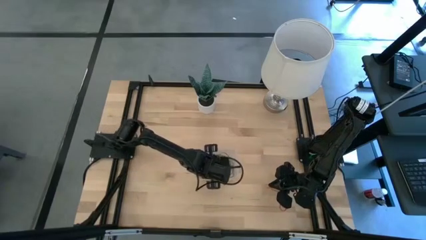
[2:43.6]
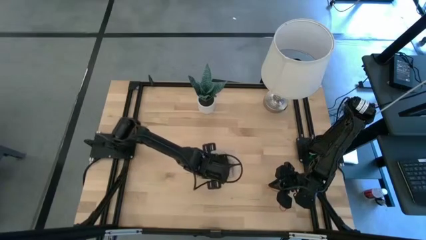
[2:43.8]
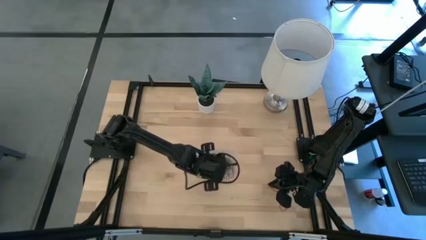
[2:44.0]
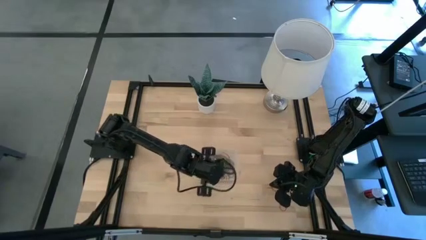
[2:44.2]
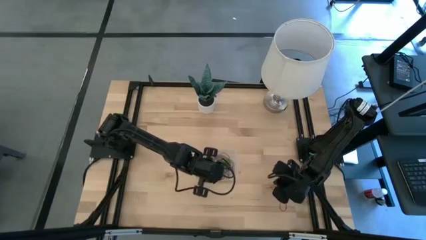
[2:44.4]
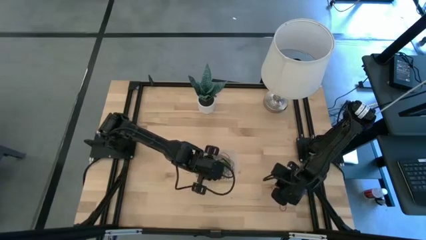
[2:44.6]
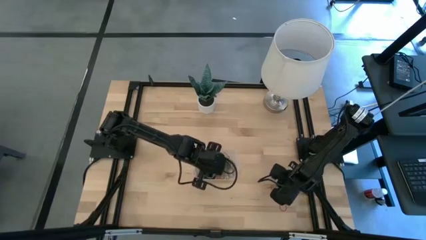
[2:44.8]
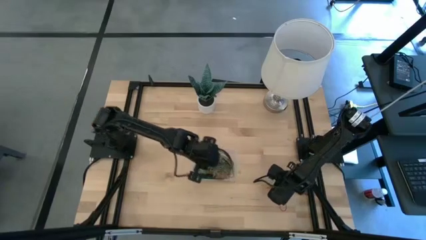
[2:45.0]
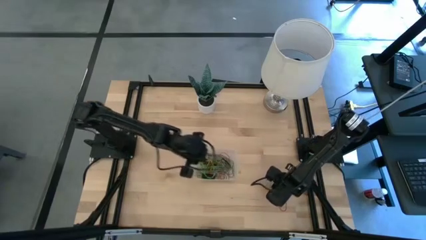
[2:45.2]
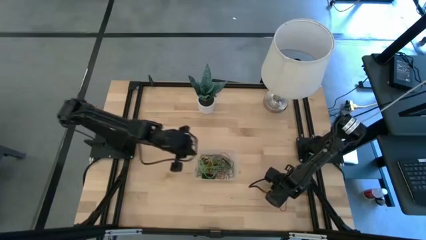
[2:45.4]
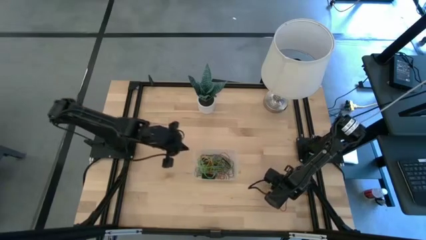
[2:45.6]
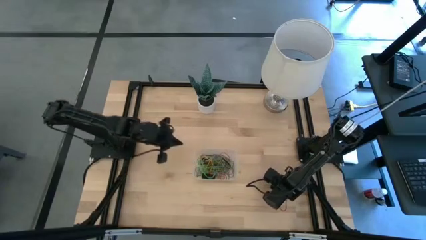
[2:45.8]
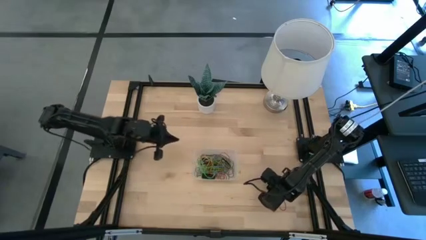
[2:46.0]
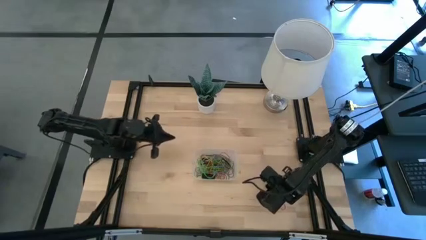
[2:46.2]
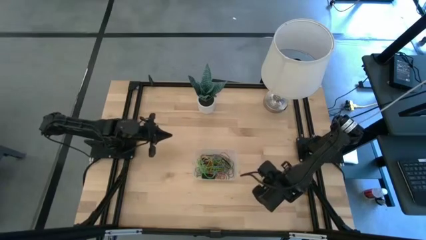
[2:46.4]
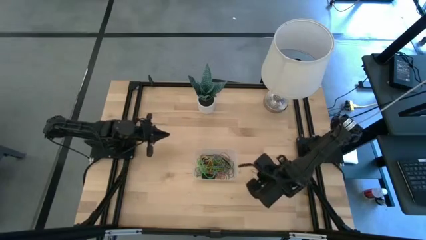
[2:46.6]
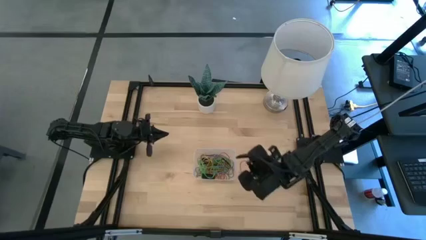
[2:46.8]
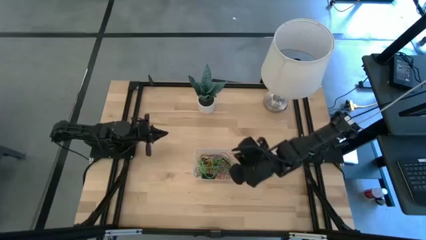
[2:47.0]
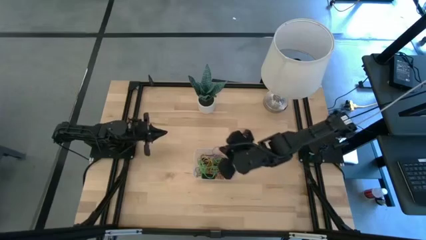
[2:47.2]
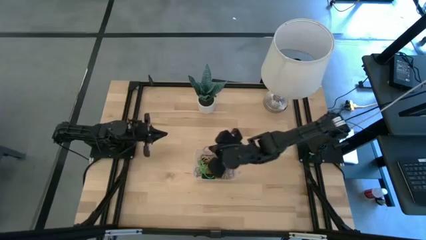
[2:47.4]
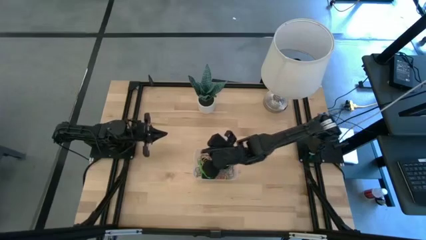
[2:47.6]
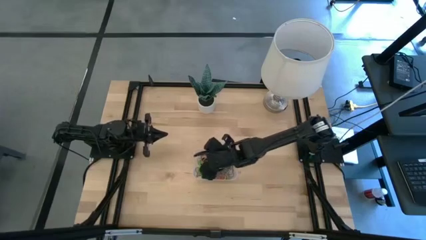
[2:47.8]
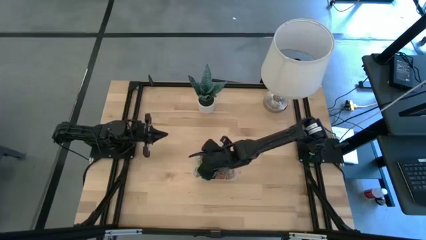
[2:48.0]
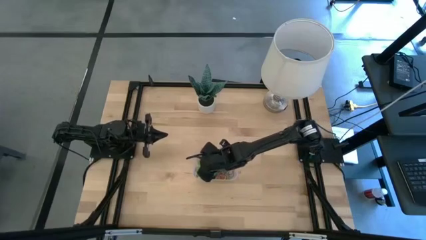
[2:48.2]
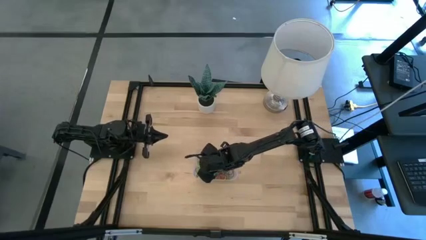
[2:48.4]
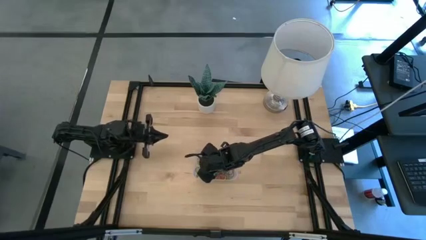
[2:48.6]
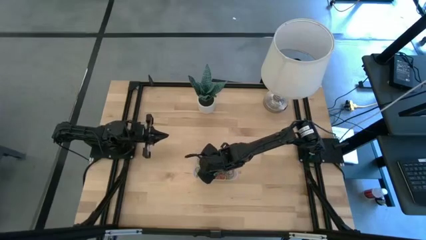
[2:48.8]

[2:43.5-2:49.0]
Task: Pick and place rubber bands into bin
Put the red rubber band into the transparent bin

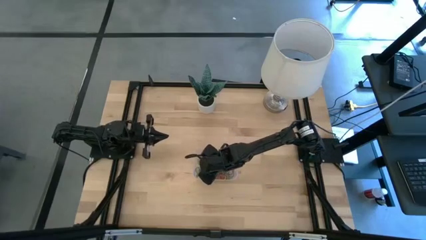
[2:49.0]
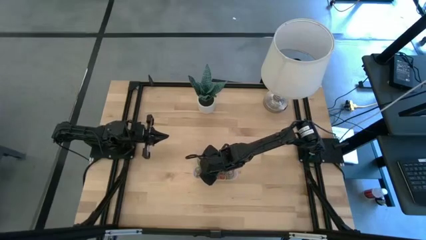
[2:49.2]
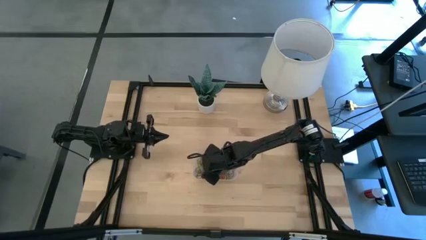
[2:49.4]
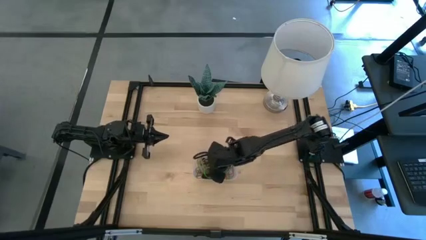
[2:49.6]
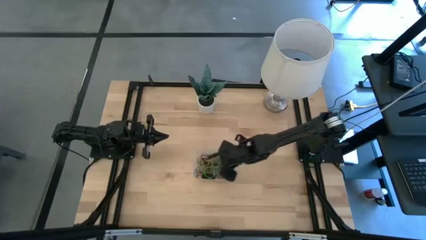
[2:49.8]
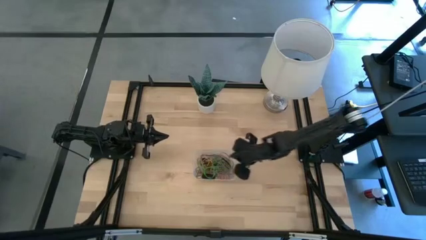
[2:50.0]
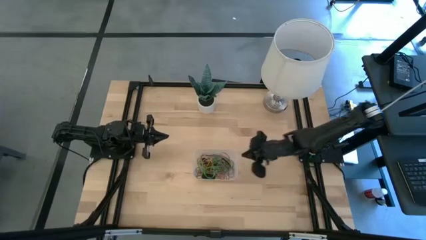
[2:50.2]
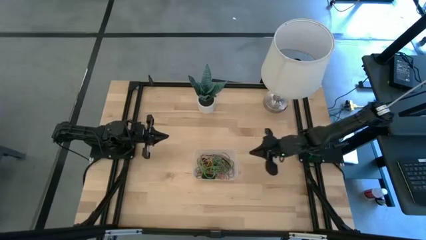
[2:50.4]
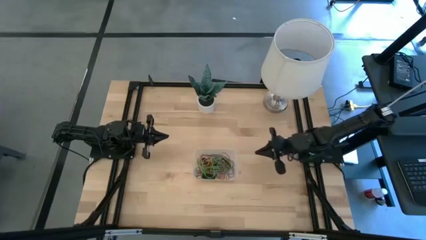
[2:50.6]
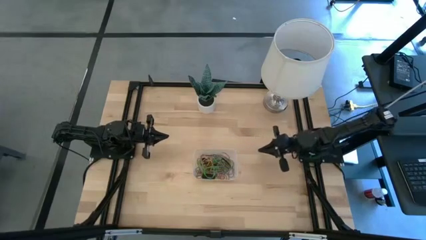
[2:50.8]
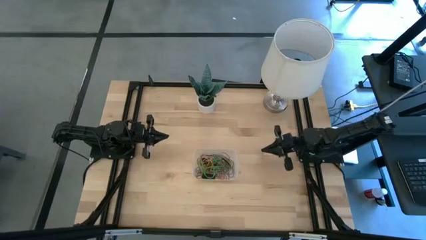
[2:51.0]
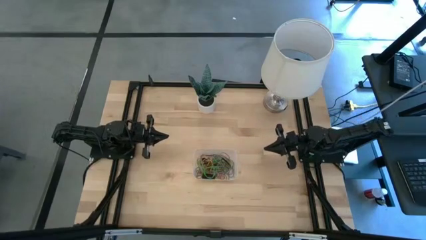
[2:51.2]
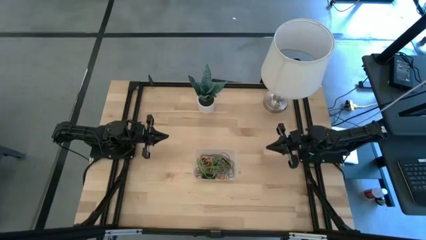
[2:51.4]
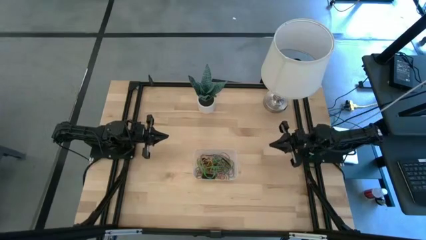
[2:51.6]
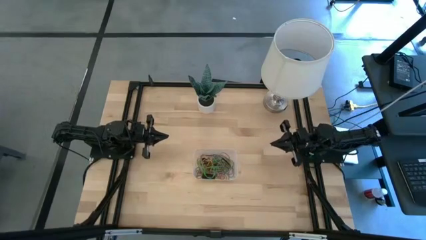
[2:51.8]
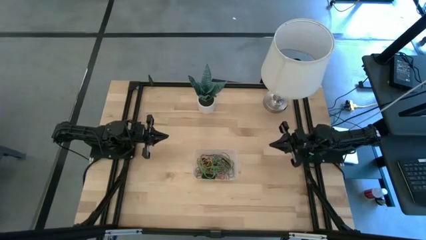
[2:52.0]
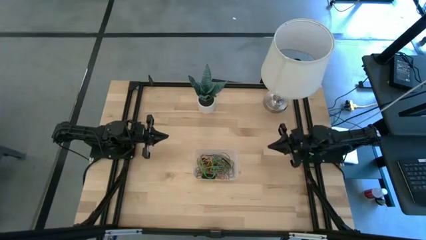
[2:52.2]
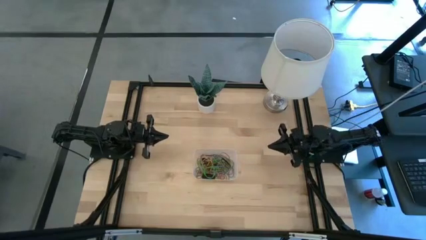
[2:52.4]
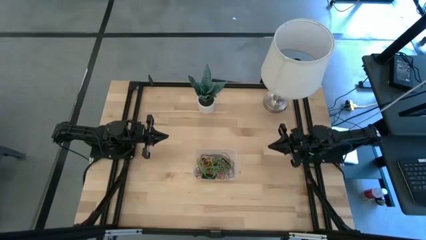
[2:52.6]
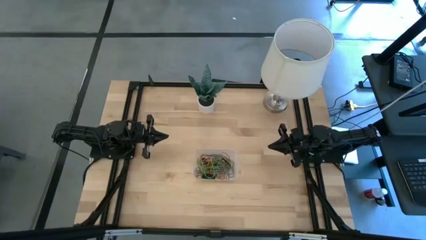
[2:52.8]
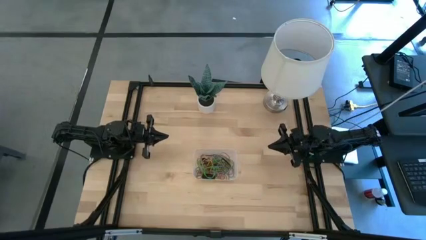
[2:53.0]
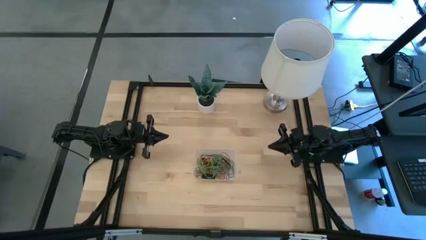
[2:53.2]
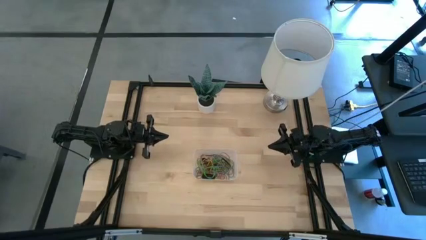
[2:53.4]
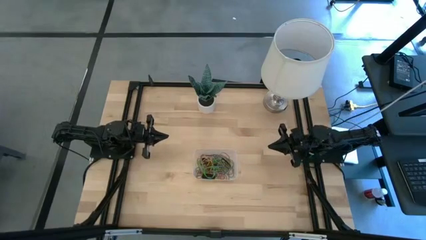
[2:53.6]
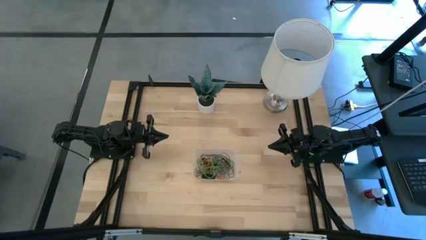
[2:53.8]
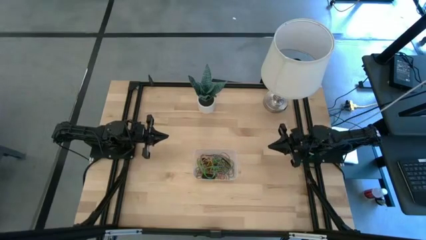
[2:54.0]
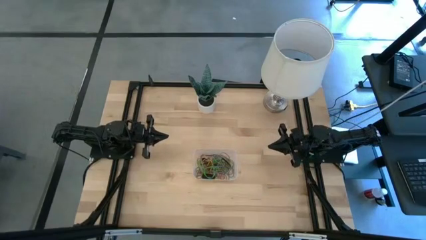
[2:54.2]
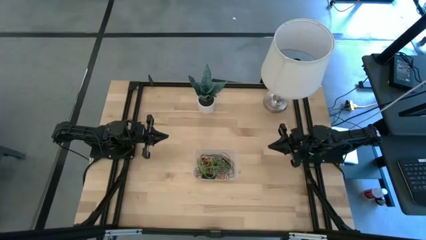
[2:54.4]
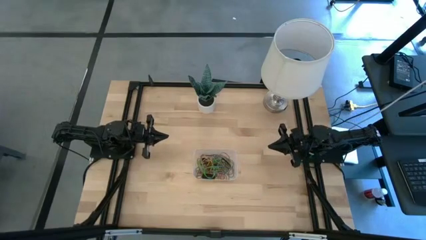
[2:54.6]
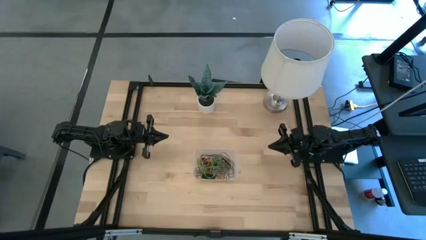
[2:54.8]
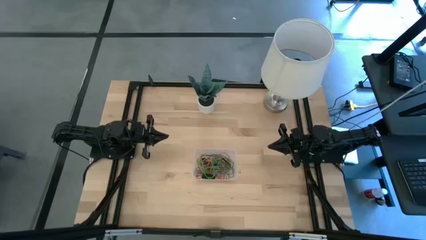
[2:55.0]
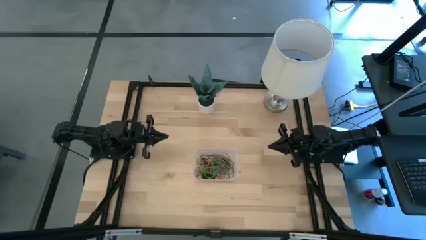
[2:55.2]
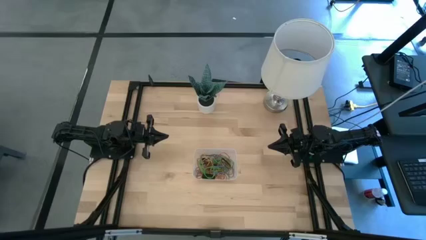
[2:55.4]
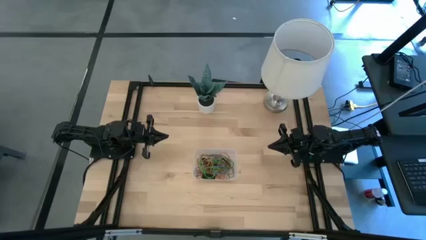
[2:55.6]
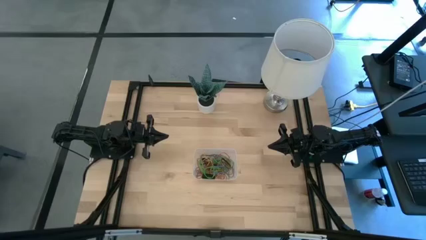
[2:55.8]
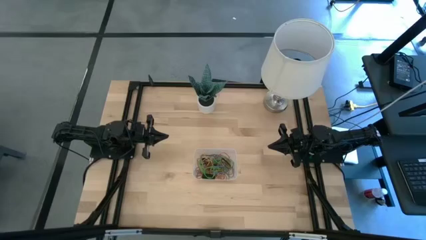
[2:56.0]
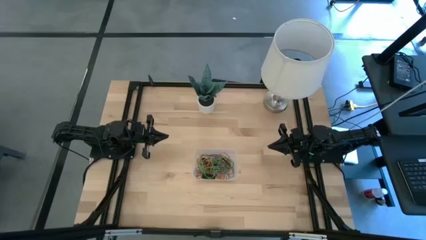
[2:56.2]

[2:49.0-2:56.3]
Return to Home Position

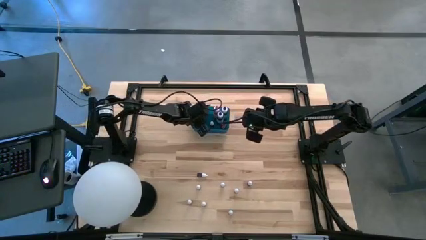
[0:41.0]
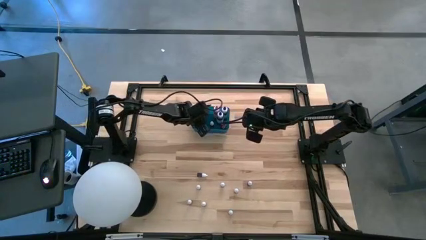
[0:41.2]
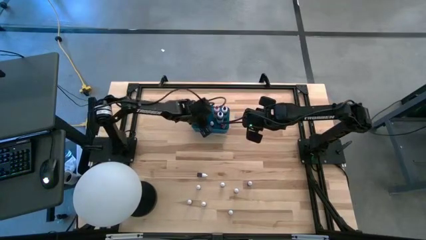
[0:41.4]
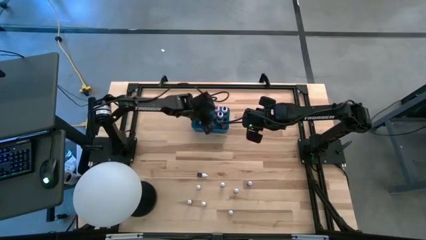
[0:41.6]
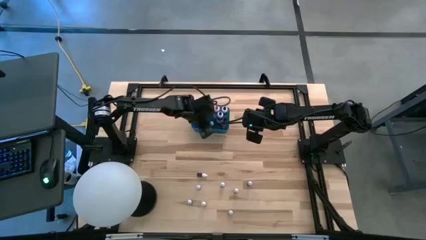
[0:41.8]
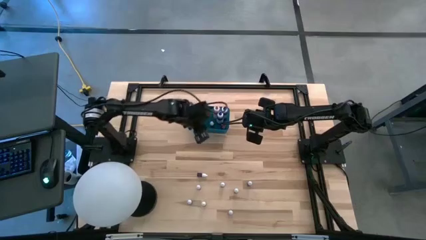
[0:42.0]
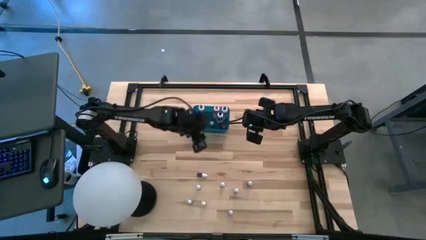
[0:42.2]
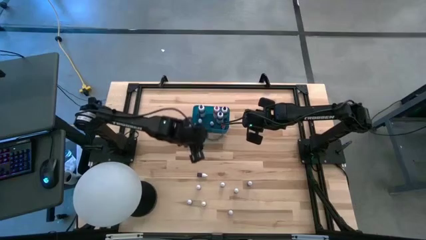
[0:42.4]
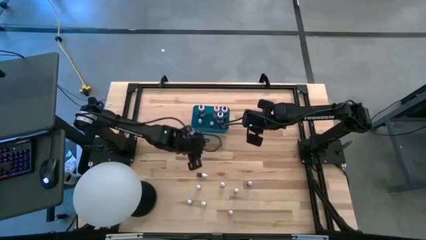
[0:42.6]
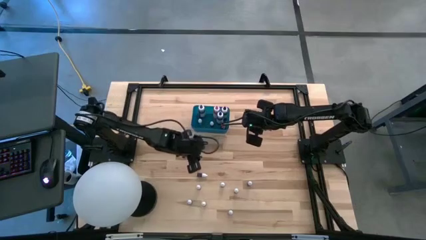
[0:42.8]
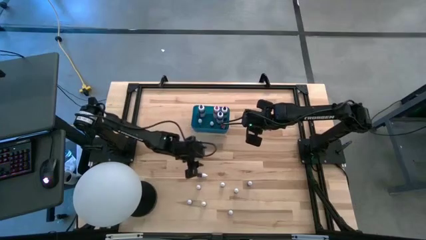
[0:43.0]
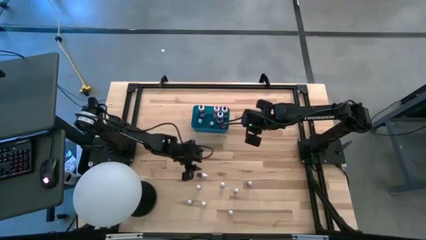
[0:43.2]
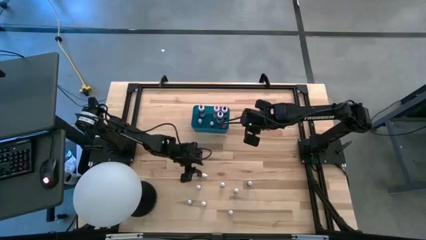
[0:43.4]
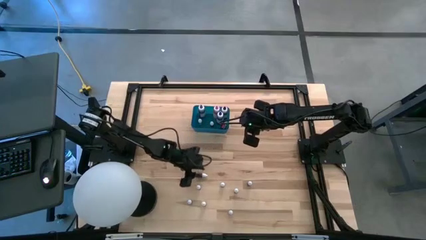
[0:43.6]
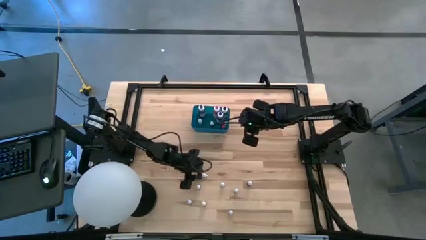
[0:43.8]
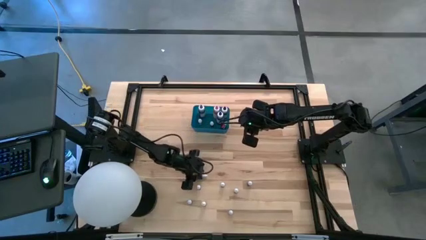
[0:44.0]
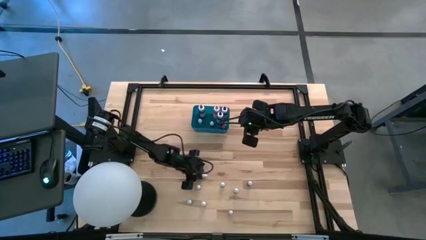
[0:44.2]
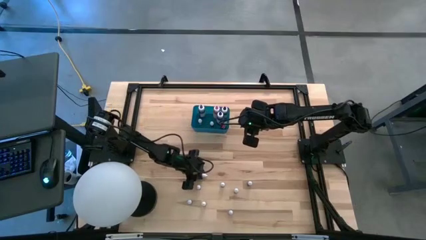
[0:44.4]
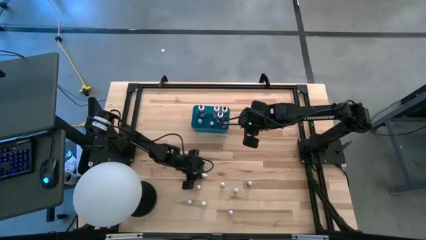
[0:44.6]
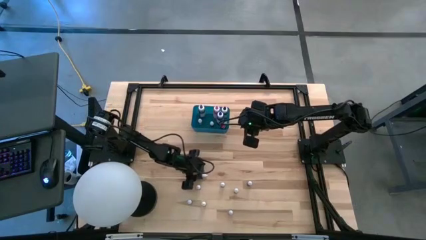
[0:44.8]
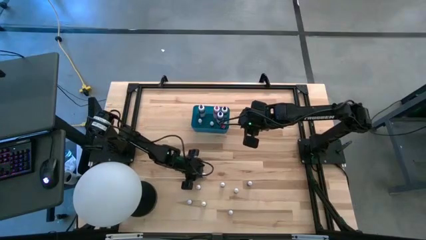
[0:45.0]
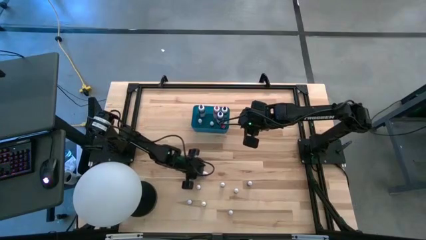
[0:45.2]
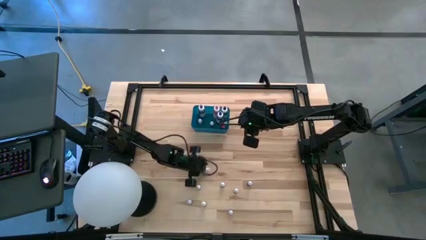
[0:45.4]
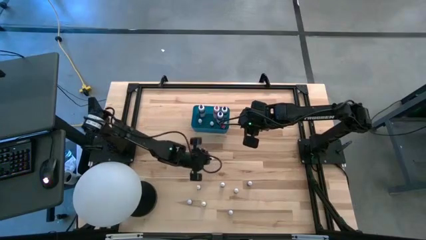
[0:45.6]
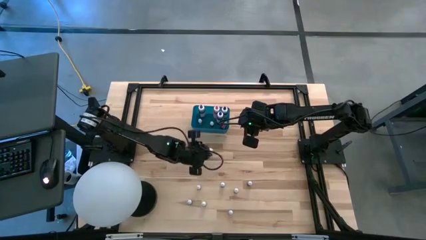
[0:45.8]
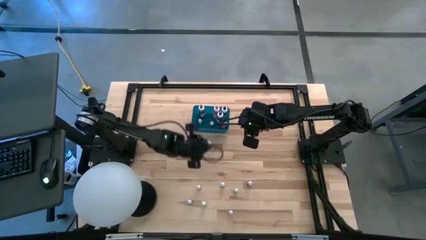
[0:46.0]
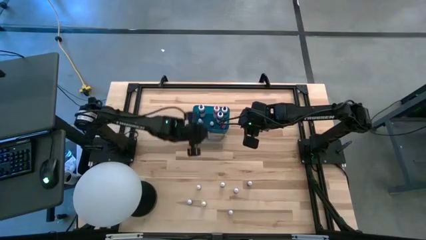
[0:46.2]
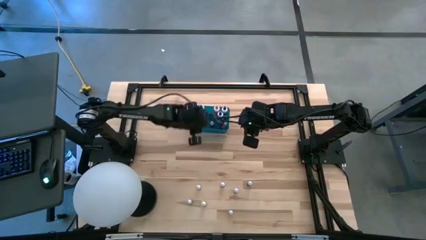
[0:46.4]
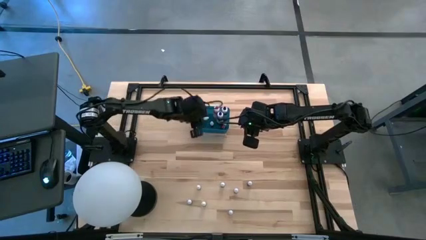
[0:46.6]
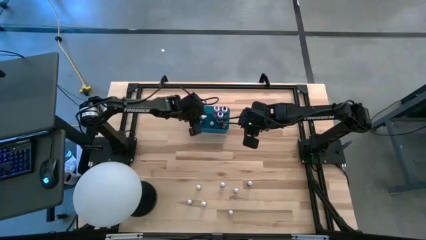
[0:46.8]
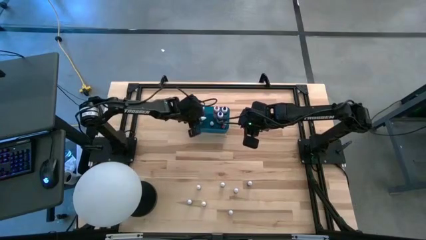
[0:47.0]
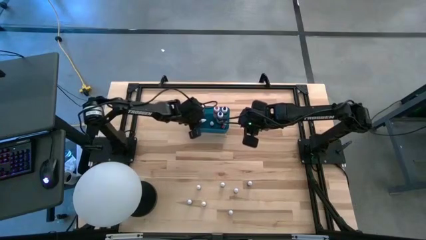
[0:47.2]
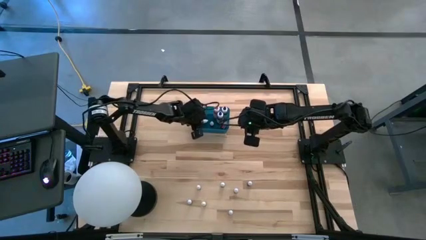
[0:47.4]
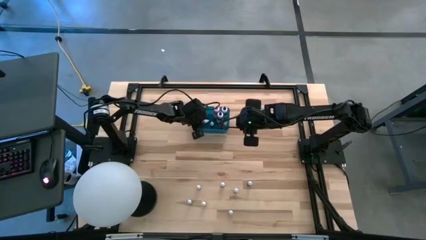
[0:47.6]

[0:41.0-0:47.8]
Task: Pick & Place food coloring
Put the purple food coloring bottle into the blue bin
